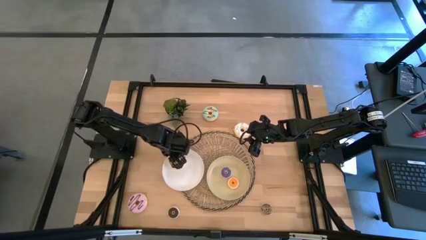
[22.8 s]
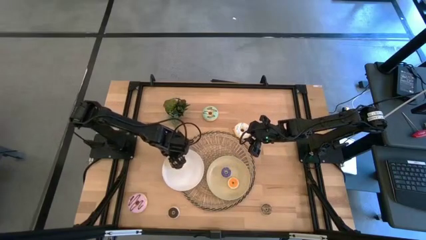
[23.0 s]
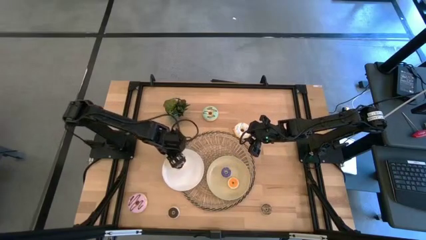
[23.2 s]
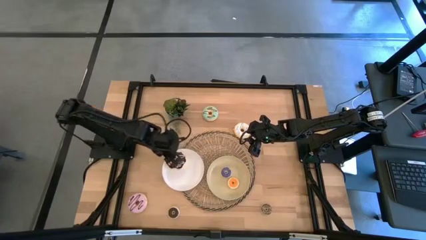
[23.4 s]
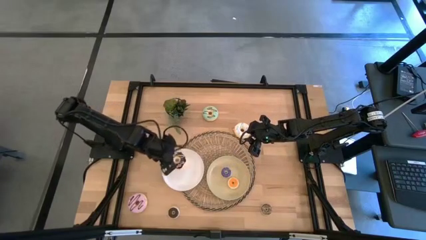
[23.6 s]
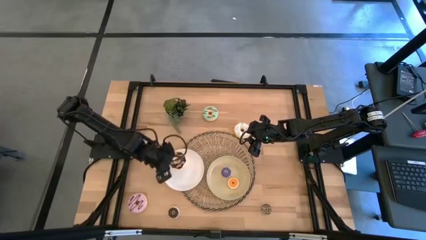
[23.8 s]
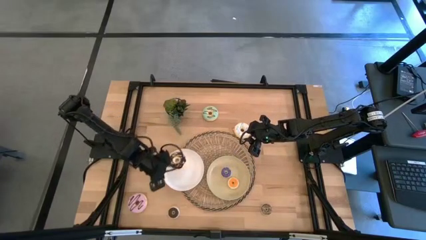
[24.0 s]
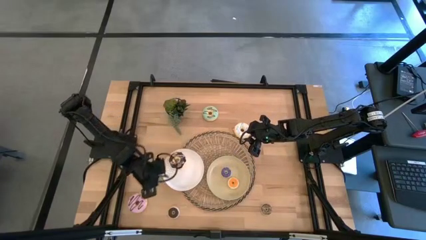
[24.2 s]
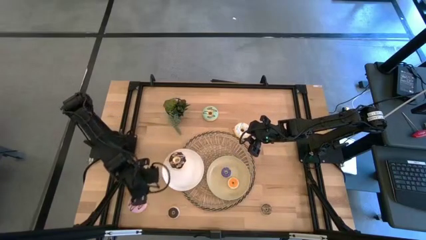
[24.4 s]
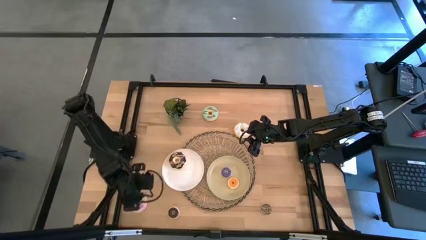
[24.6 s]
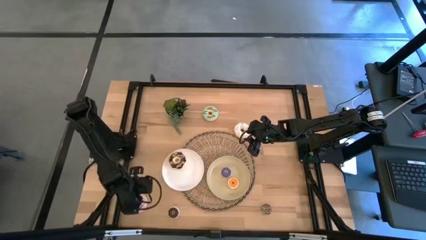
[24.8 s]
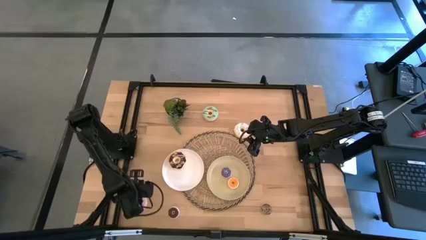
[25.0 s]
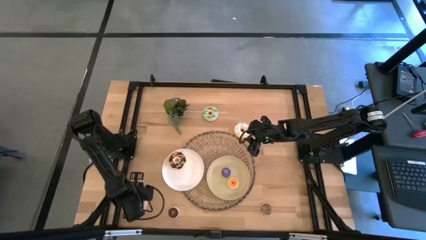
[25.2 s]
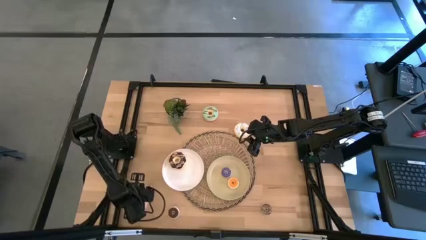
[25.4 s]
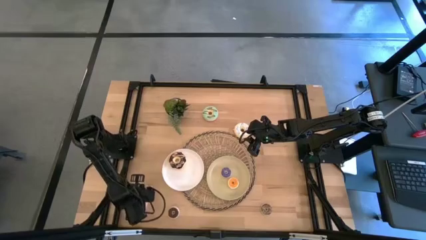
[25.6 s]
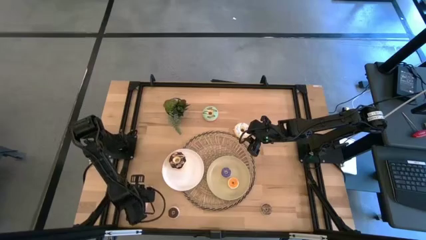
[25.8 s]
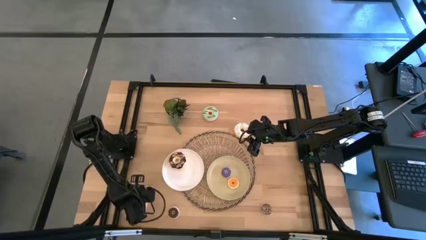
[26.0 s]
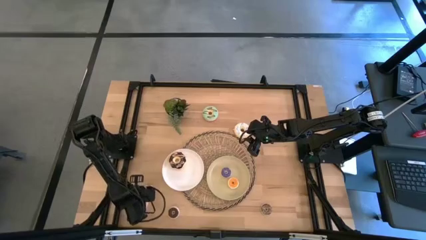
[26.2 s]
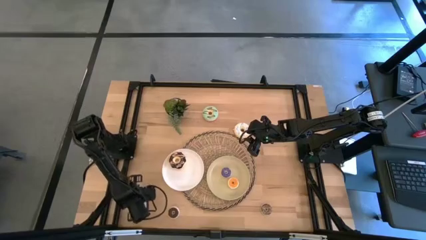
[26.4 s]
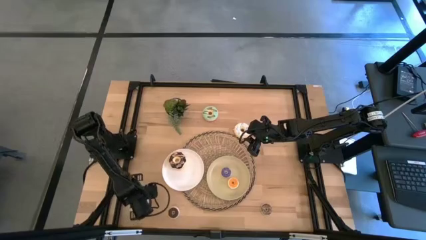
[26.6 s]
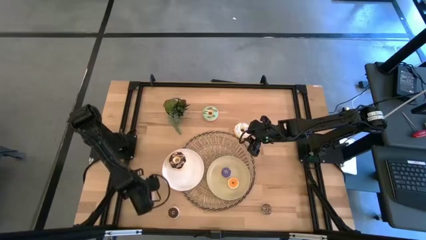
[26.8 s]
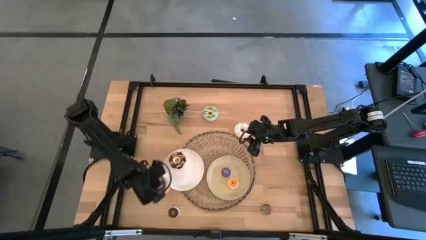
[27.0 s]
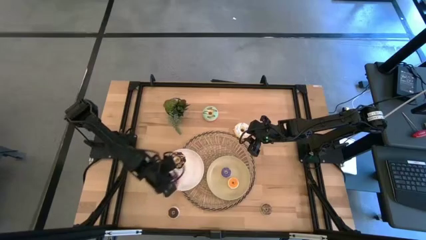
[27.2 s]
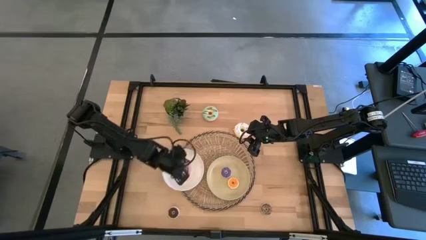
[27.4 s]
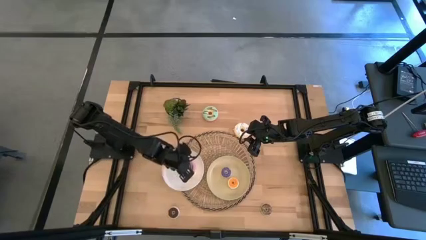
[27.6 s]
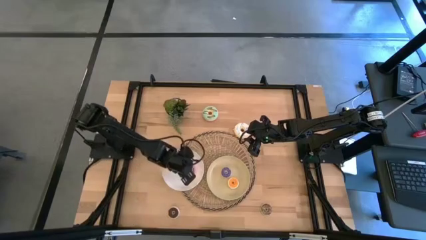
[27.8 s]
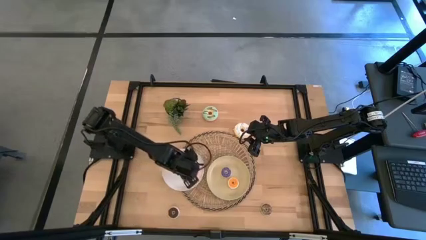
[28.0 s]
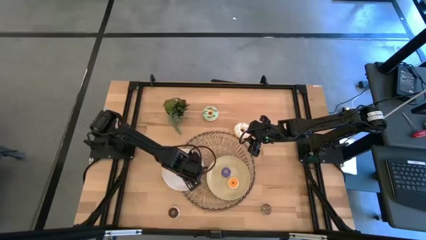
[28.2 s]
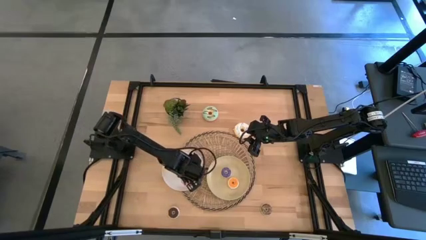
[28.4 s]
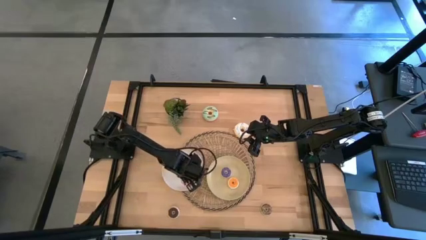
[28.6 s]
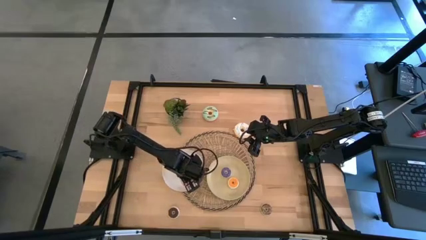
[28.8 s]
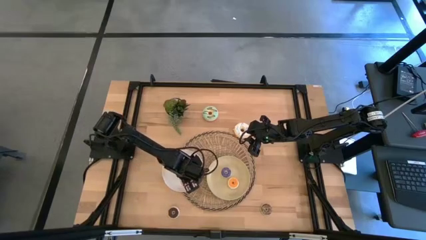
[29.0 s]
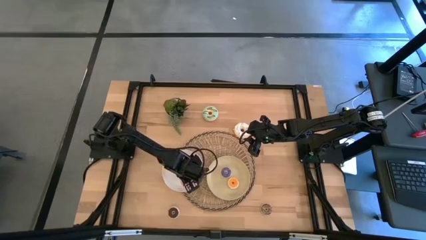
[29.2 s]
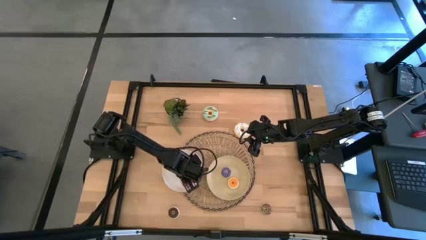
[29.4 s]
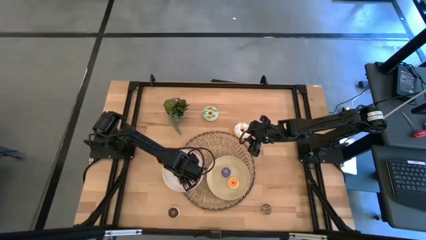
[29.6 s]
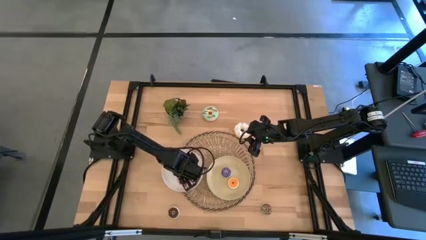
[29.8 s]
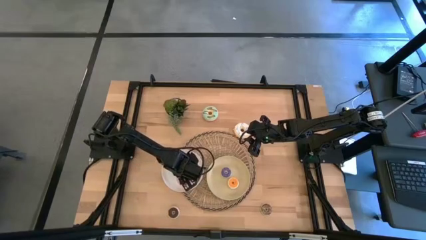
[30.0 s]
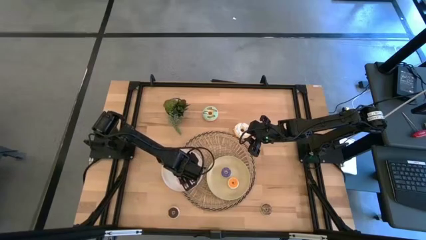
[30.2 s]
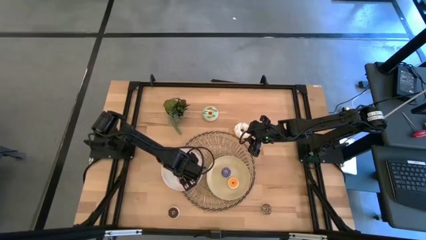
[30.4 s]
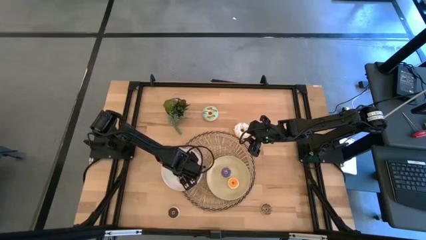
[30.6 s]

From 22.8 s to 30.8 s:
Task: Pick & Place donuts
Put the large purple donut on the white plate

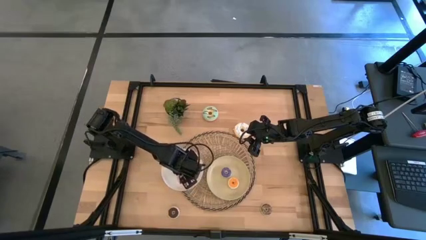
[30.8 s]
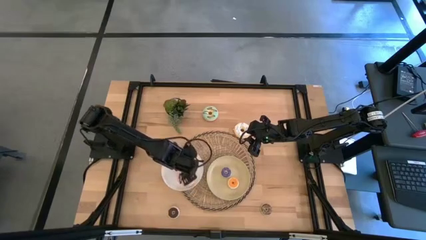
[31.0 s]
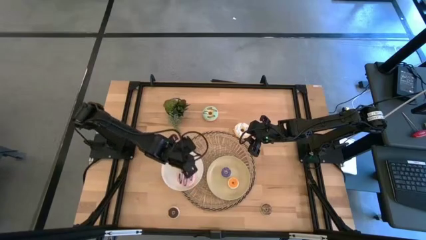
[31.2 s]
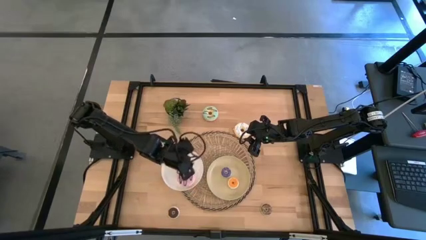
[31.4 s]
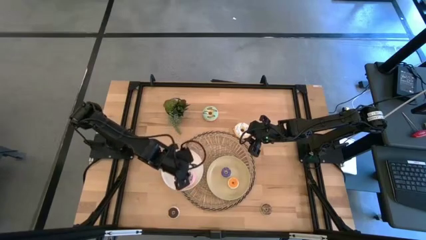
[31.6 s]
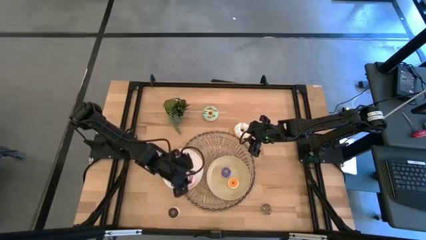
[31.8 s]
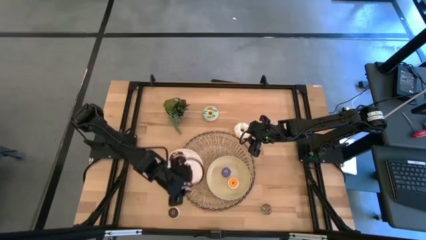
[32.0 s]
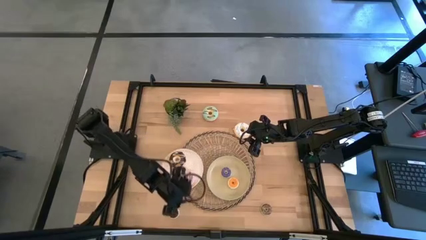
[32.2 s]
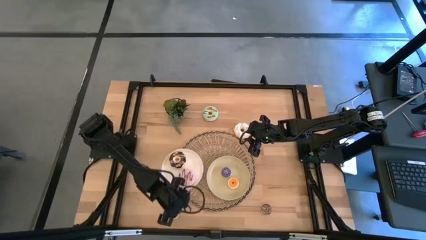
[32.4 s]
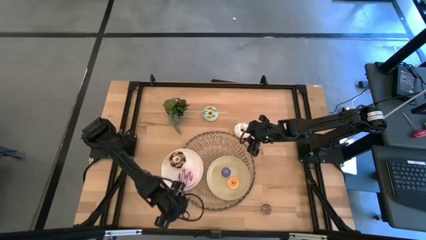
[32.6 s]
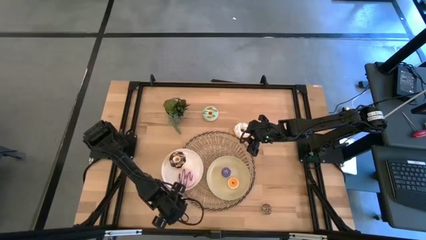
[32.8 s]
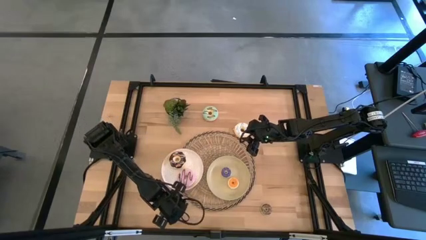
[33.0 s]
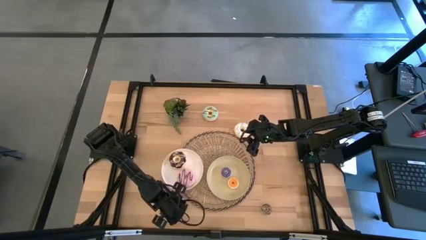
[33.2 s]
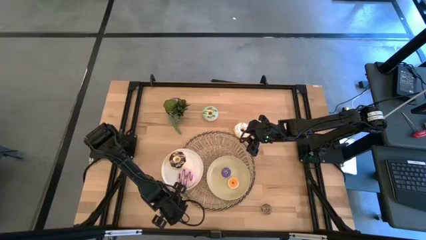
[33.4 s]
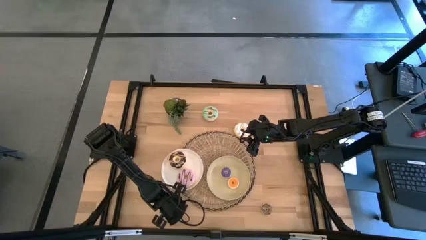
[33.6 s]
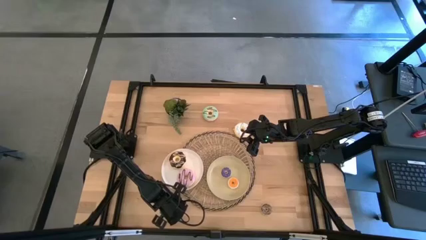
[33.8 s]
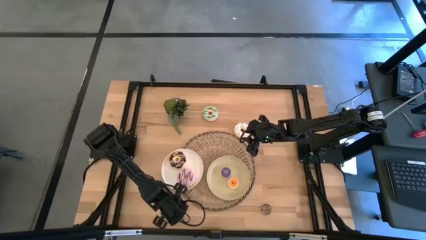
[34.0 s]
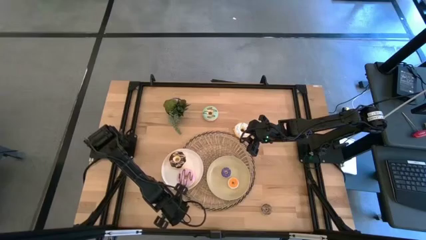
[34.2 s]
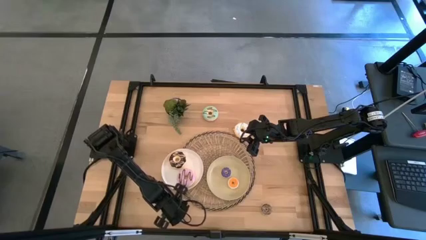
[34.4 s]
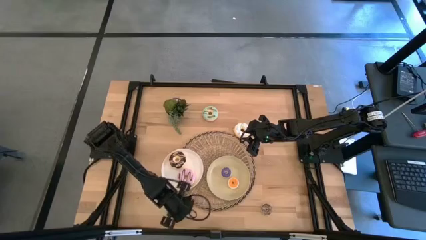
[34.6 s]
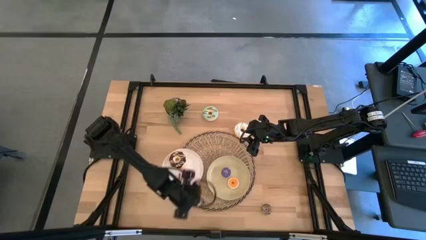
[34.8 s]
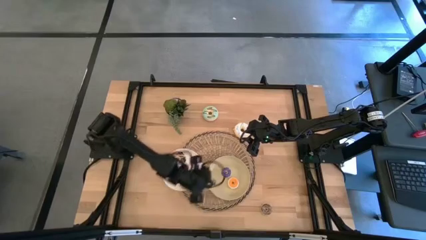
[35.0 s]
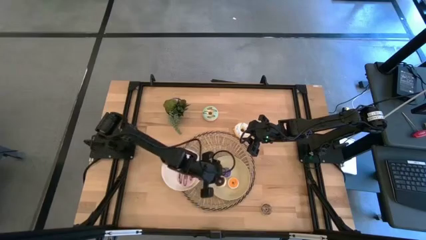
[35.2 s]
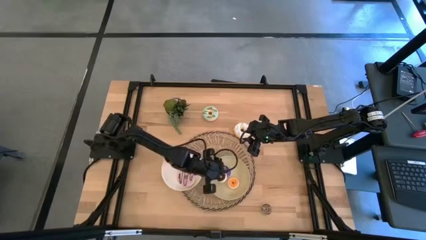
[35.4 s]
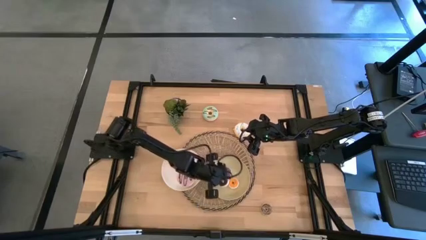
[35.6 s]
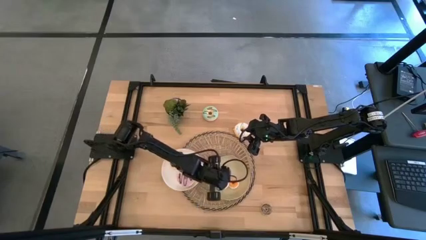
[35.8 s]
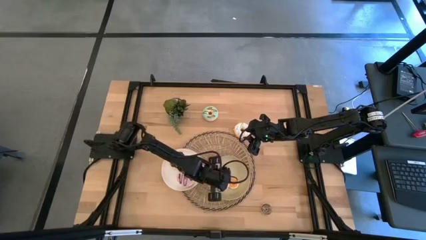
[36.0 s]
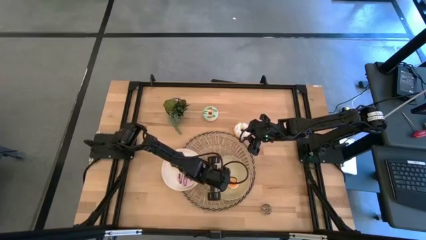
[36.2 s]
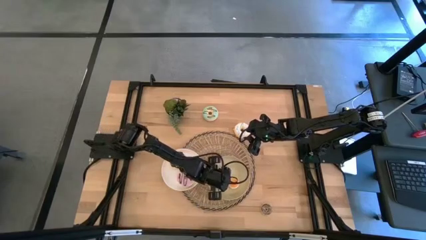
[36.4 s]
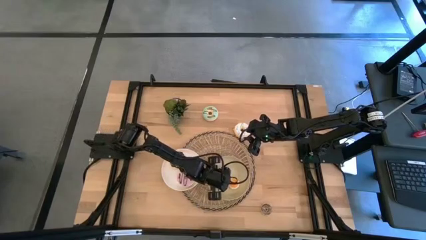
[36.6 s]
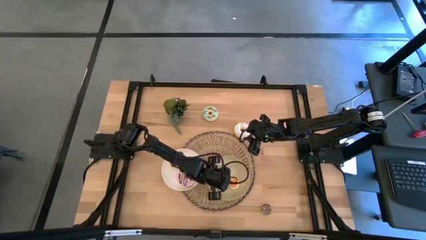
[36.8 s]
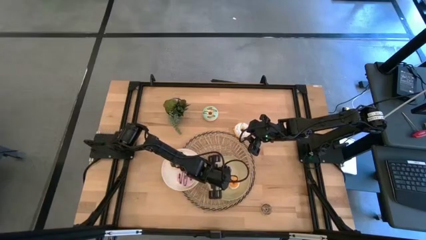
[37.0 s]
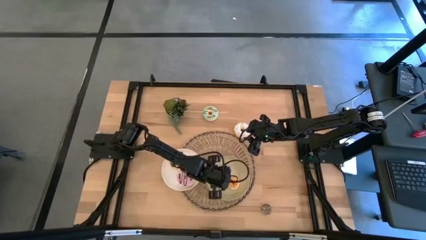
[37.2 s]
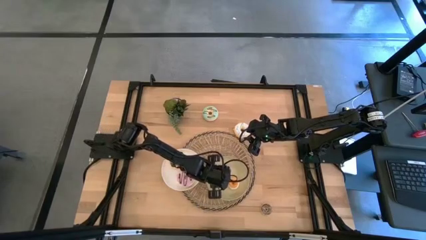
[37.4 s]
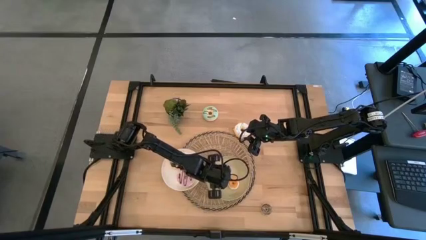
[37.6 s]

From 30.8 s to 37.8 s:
Put the small black donut on the brown plate

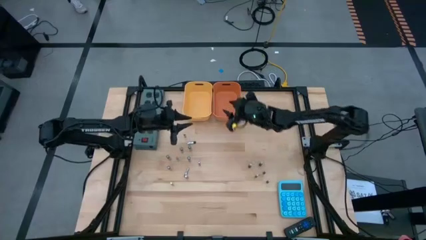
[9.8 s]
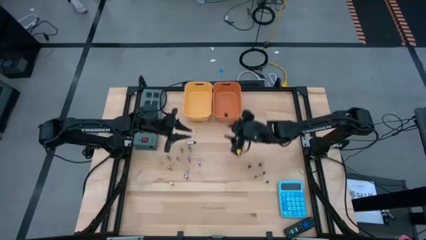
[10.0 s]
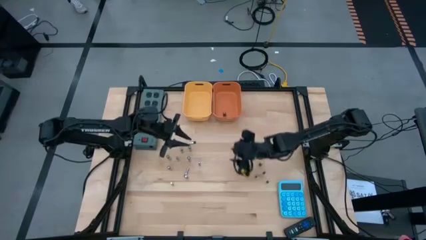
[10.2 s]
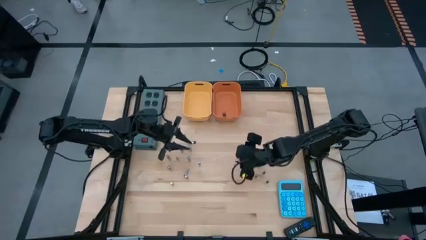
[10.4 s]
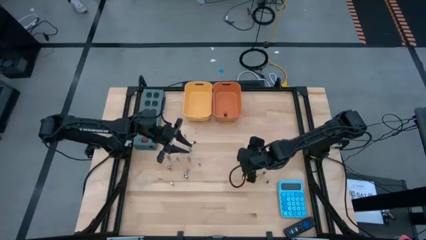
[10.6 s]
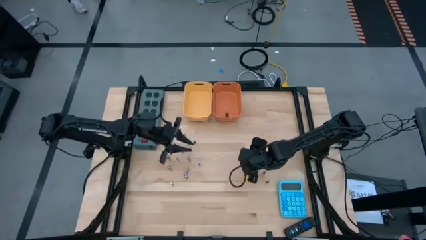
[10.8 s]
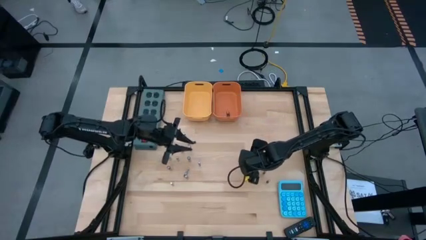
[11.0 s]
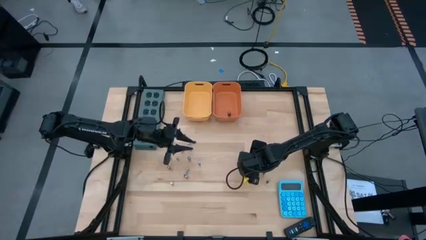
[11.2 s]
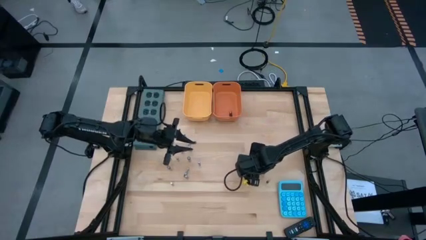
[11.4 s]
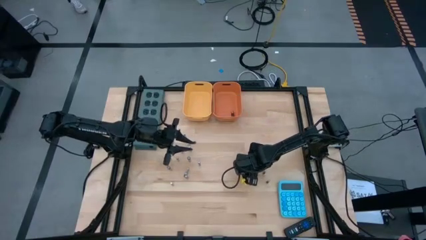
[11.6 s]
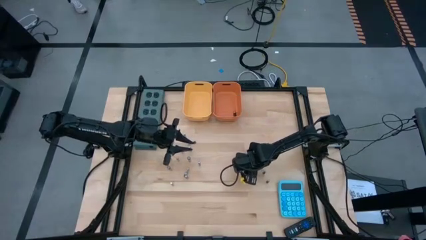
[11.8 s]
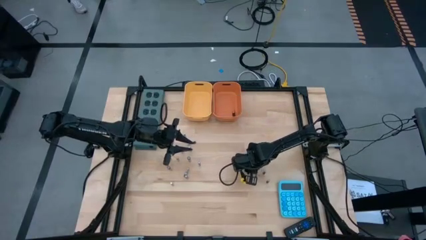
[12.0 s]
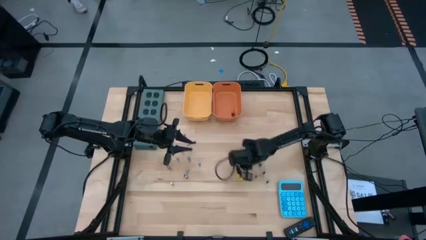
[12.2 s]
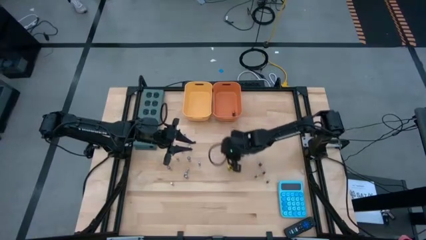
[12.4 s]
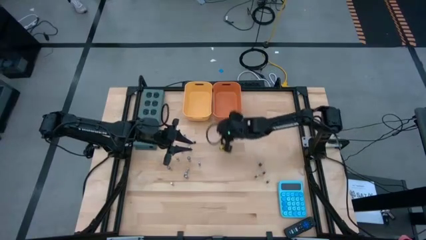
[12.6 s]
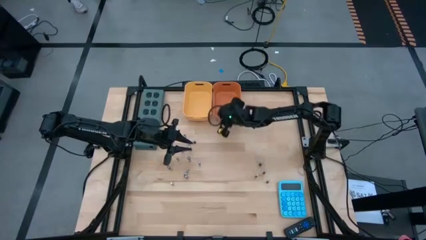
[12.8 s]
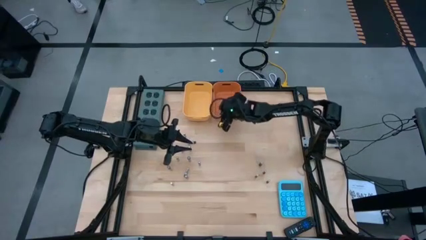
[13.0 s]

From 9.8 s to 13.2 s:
Task: Sort batteries
Put the black battery into the orange bin
